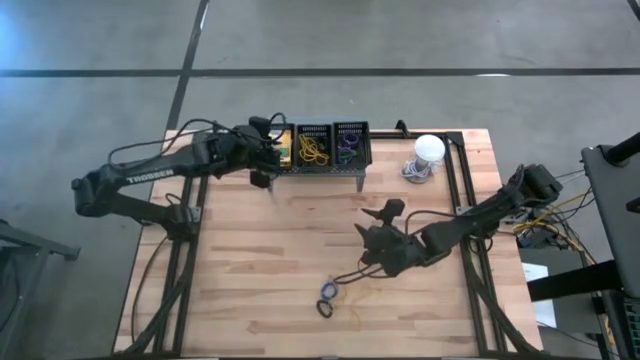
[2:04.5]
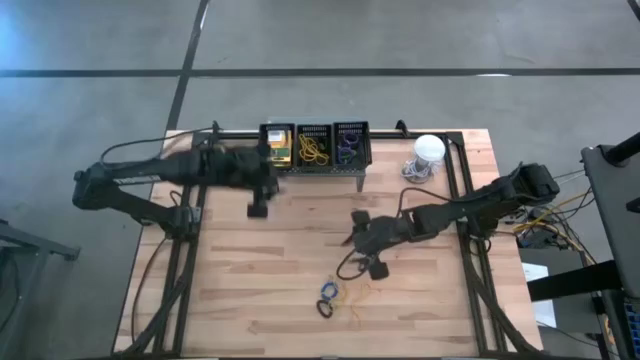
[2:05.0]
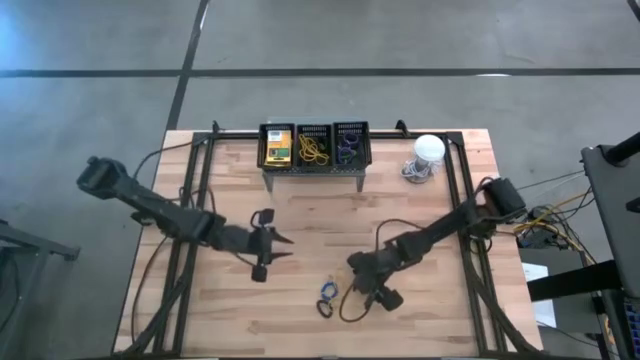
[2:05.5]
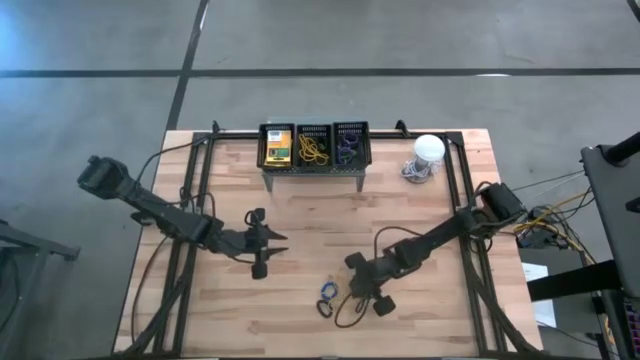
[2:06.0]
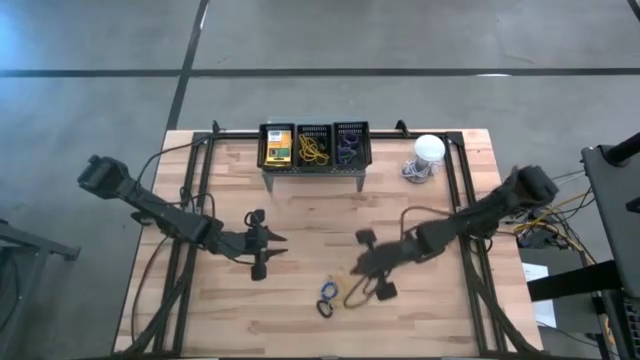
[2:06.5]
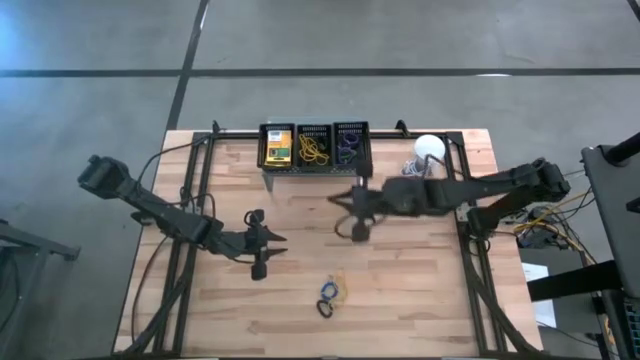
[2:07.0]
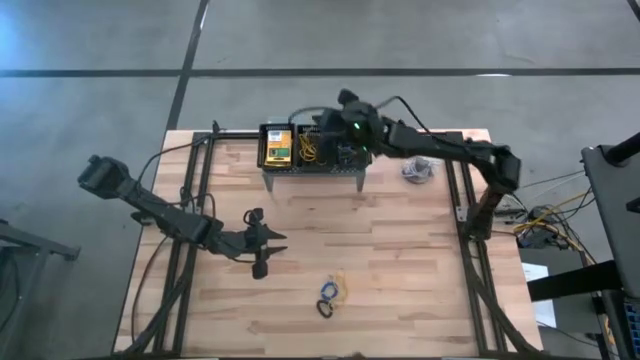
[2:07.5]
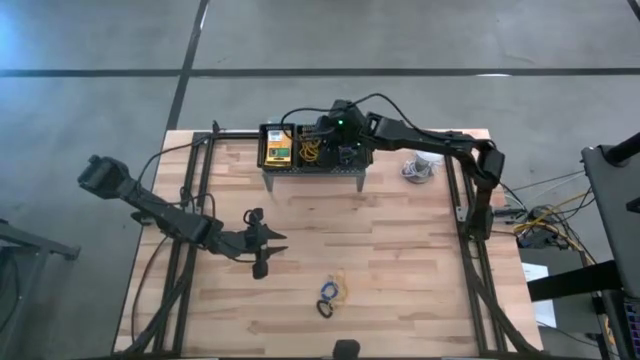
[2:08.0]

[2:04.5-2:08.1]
Task: Pick & Place Office Desk Supplies
Put the yellow rubber band into the middle black bin

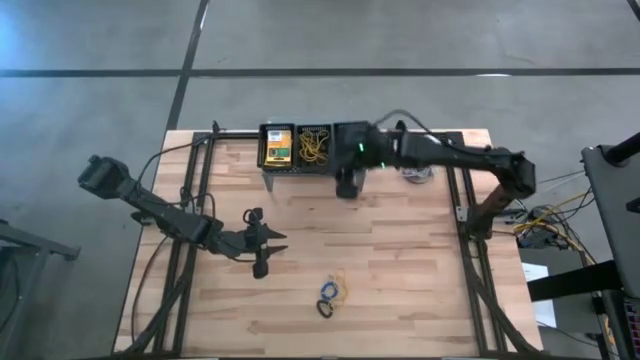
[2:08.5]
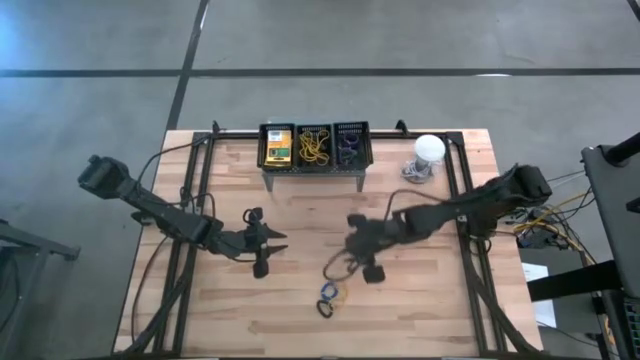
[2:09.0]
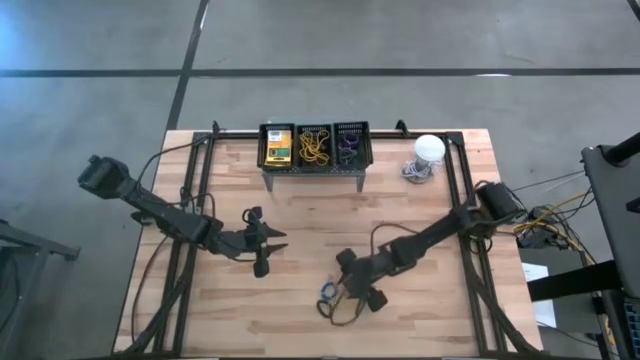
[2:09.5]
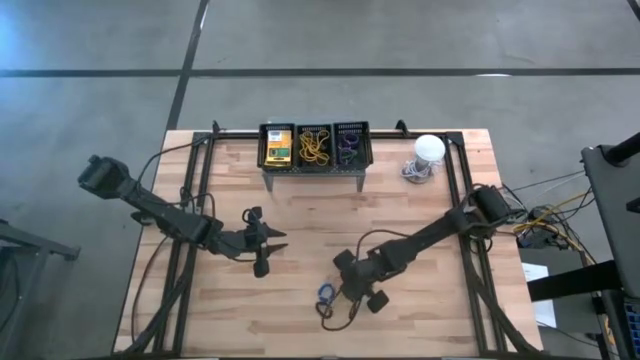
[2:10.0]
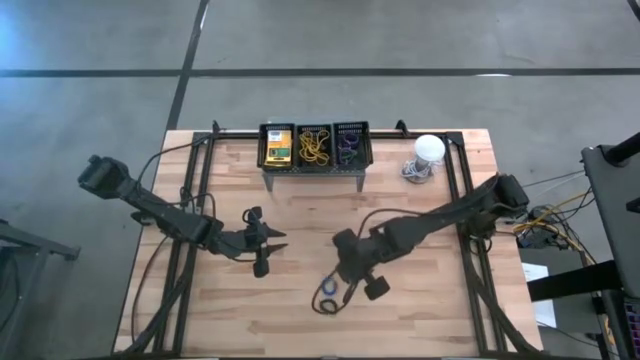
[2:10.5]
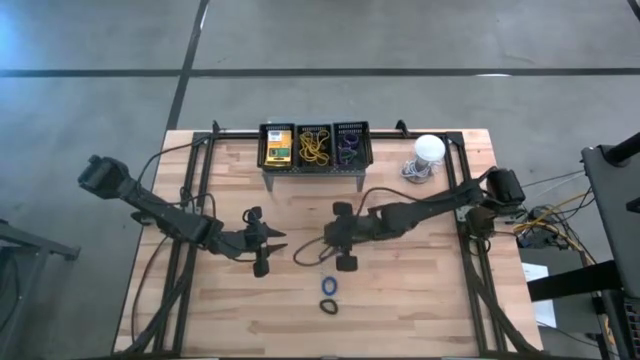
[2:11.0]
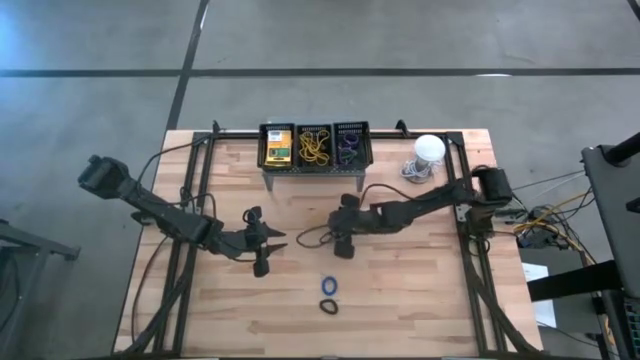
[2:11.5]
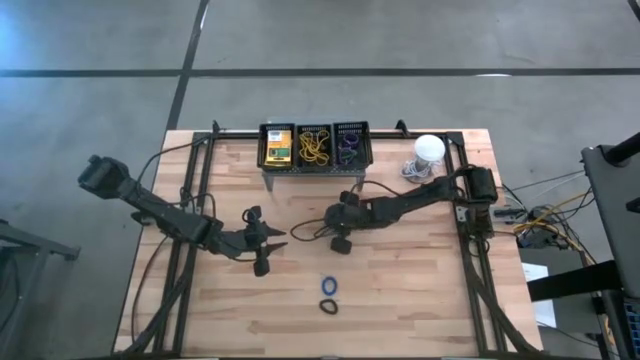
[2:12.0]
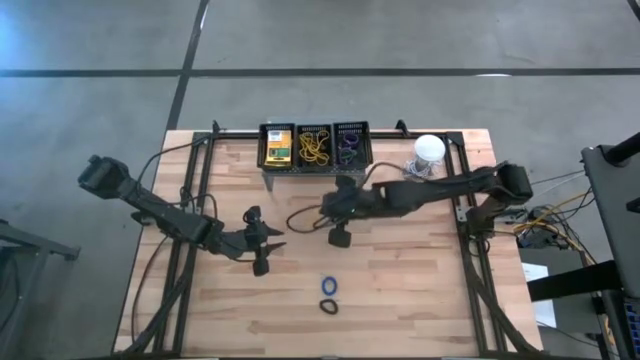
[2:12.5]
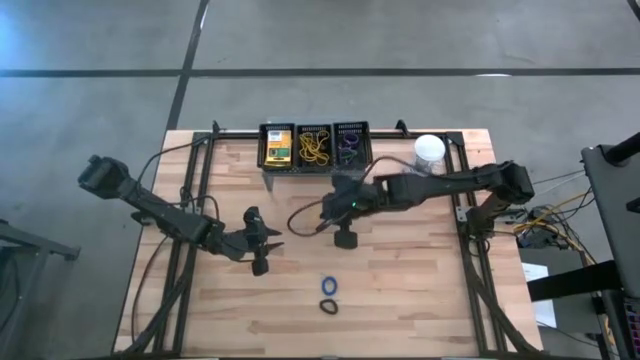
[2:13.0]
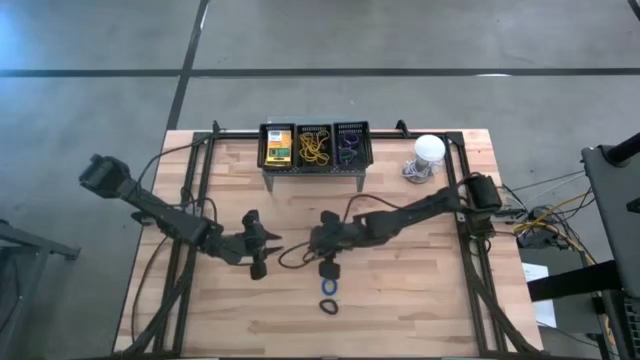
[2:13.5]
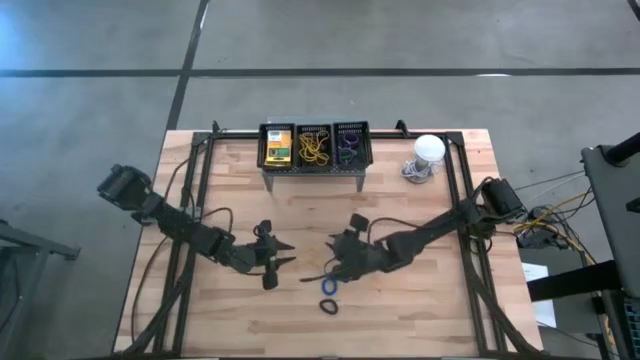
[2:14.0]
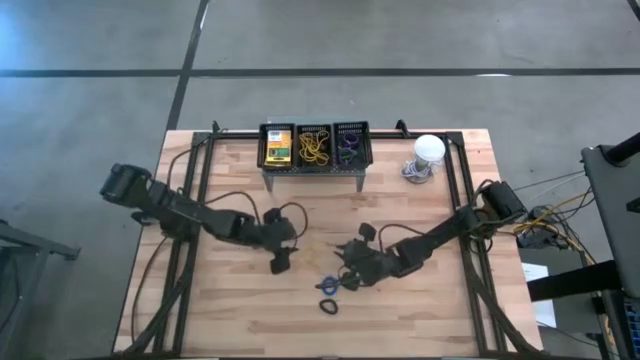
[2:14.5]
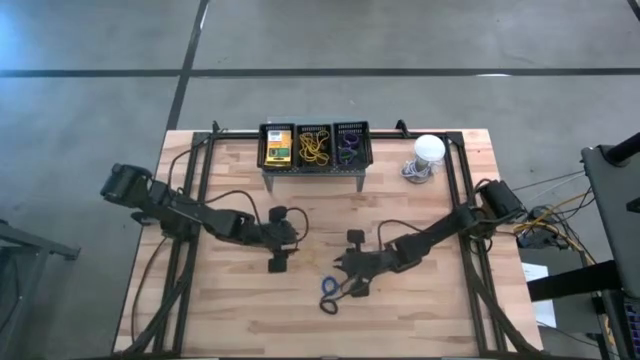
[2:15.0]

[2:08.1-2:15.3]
Put the yellow rubber band into the middle black bin

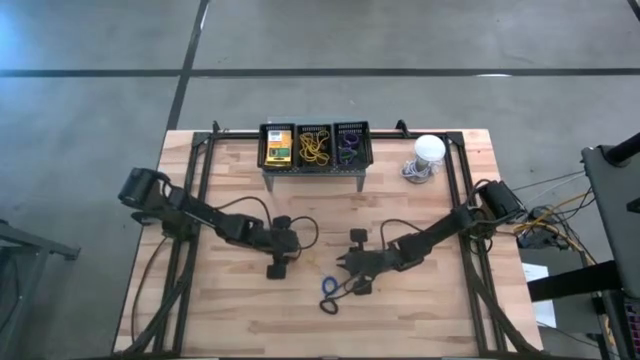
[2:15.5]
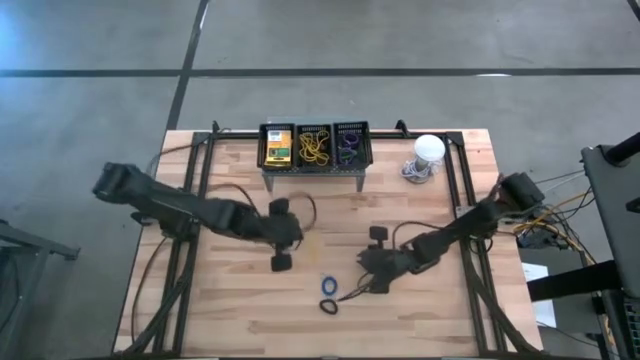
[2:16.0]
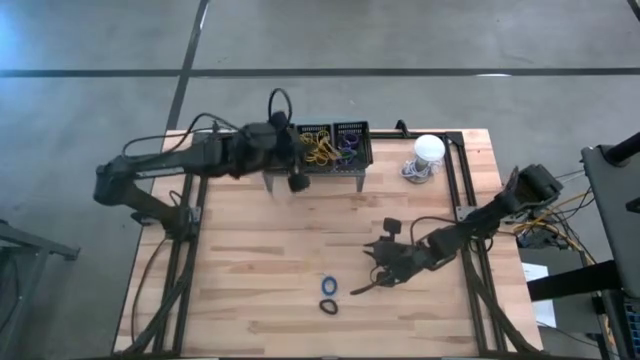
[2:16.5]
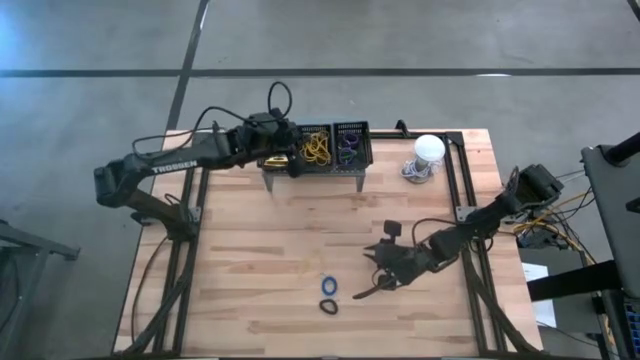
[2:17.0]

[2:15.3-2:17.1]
Put the yellow rubber band into the middle black bin

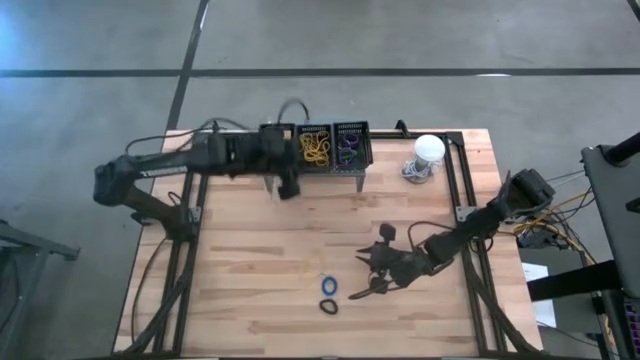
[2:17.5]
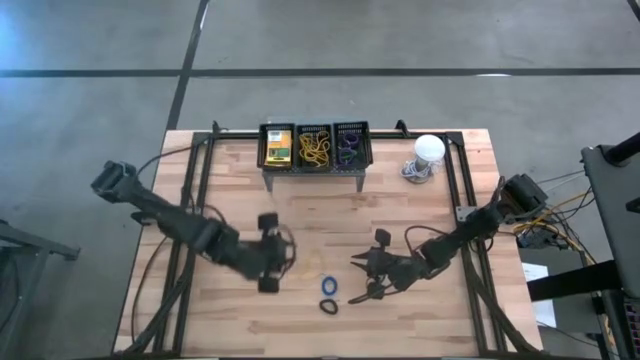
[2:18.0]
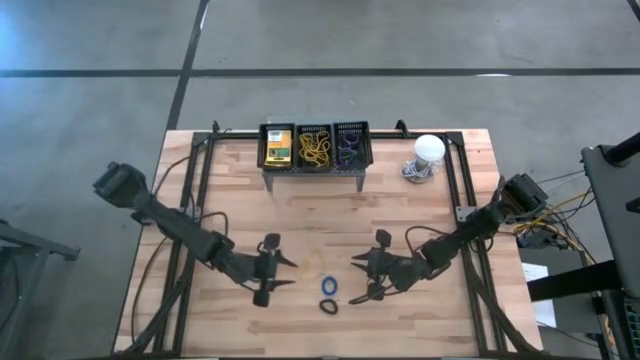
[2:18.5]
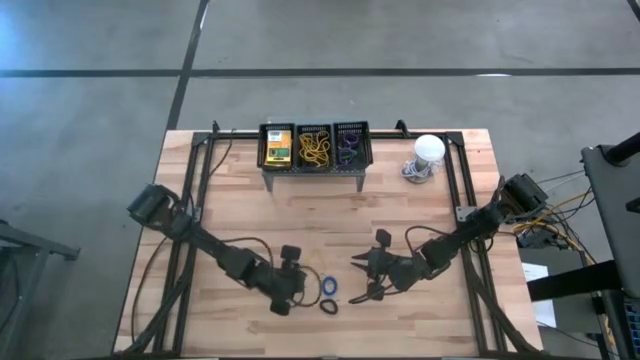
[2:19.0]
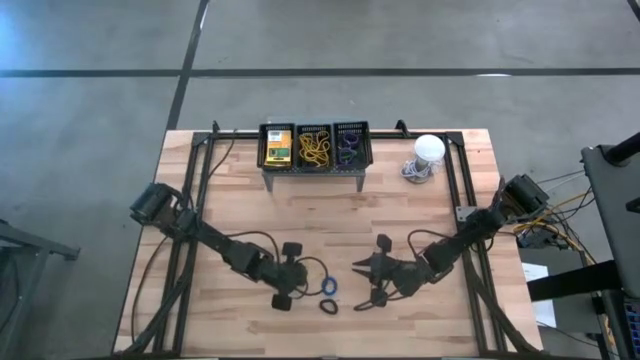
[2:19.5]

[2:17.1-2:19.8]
Put the yellow rubber band into the middle black bin

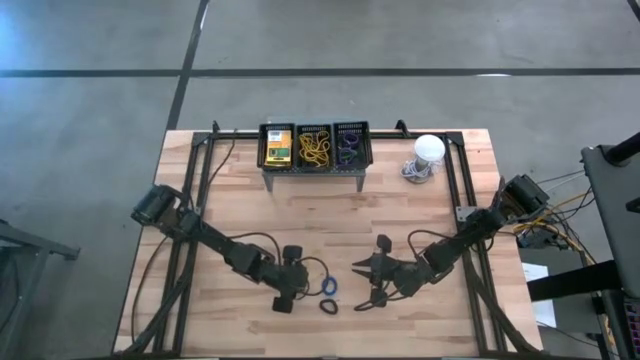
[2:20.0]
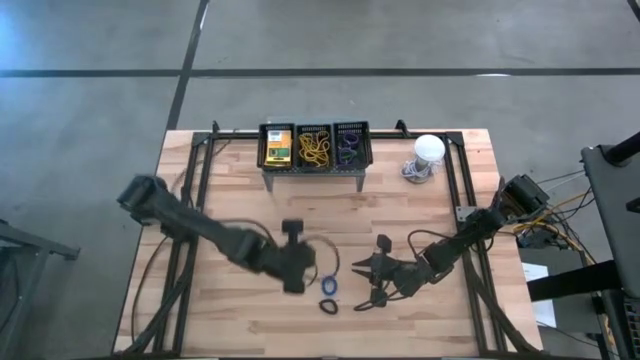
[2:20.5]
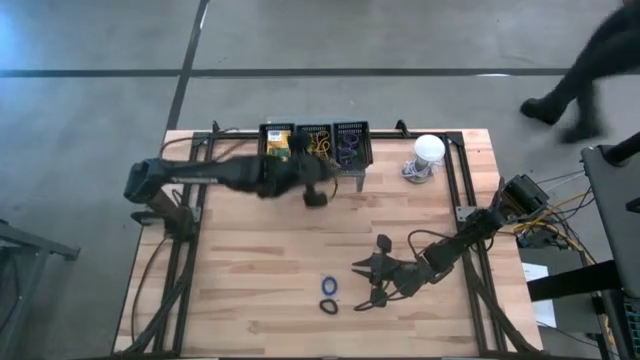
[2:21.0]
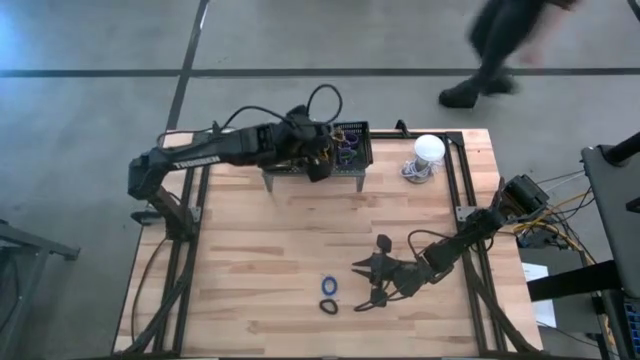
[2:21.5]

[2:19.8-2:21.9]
Put the yellow rubber band into the middle black bin

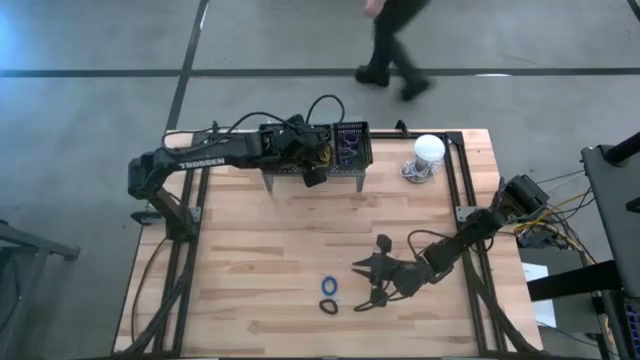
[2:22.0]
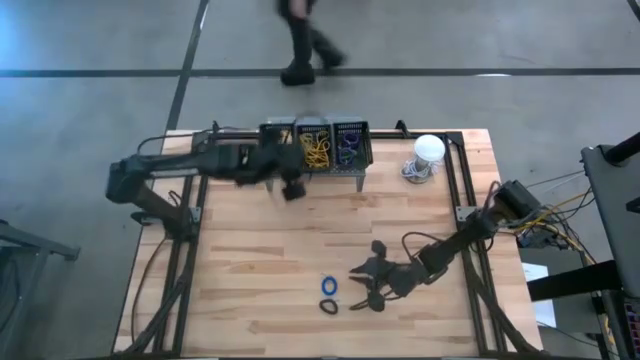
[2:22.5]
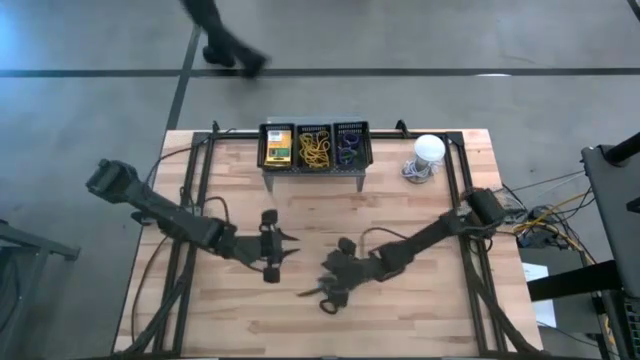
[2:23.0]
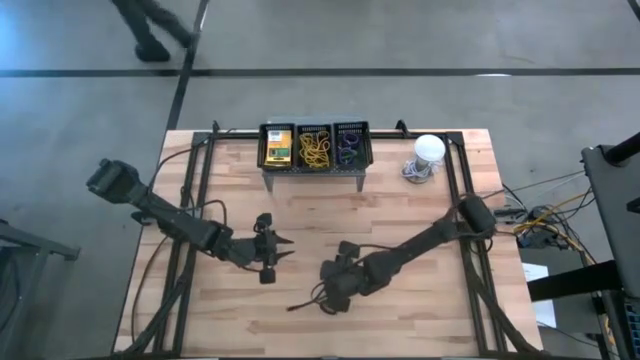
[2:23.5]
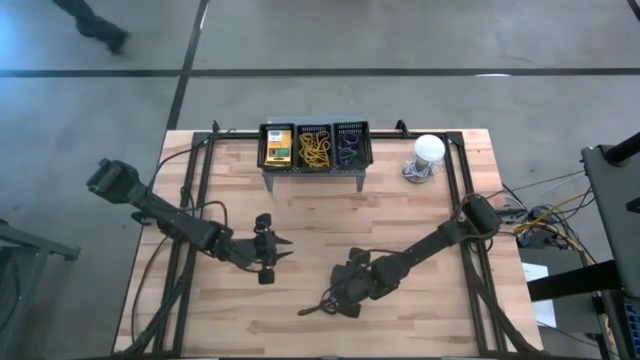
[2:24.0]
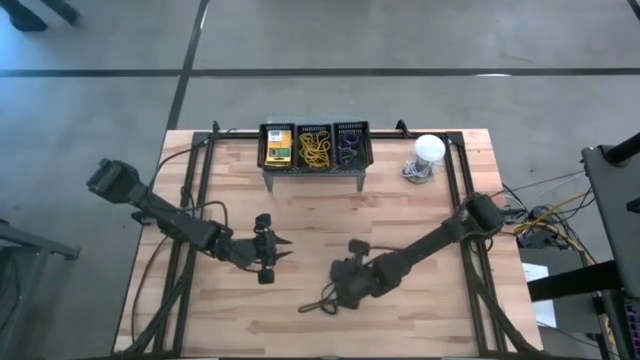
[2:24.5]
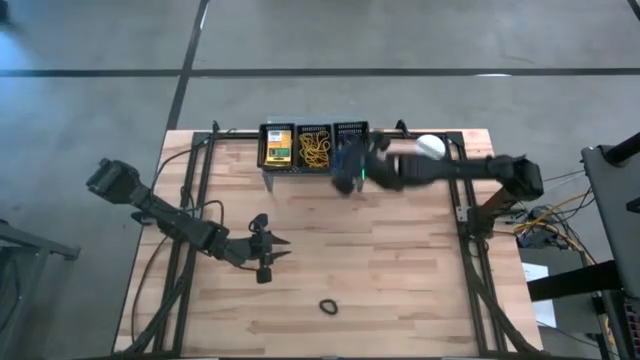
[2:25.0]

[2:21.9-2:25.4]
Put the blue spring key chain into the right black bin

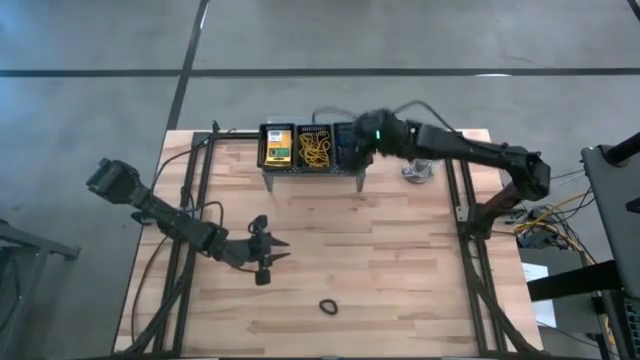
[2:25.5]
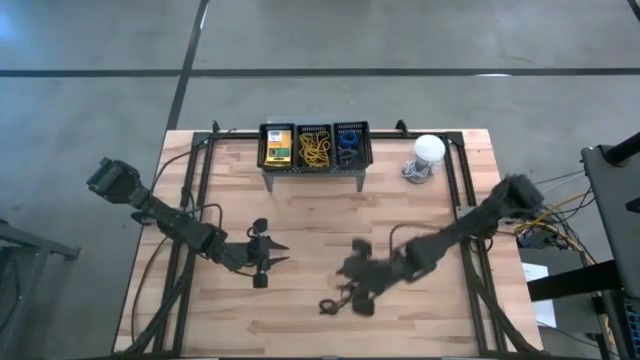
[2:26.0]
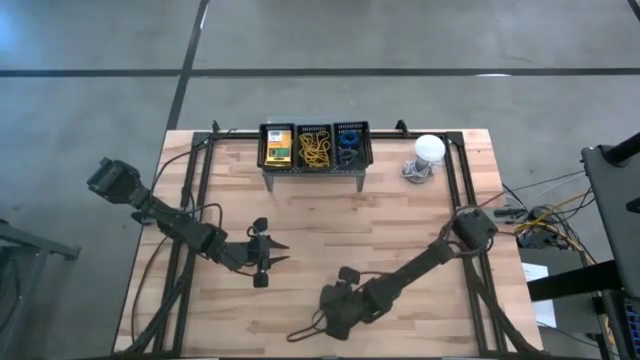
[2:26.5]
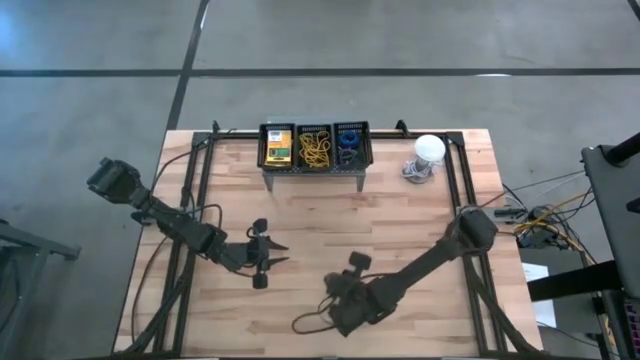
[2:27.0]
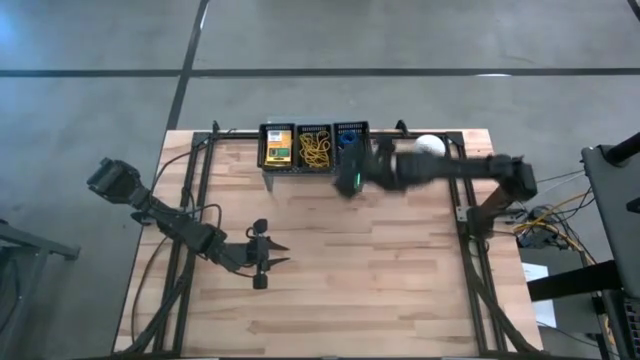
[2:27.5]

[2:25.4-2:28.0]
Put the black spring key chain into the right black bin
